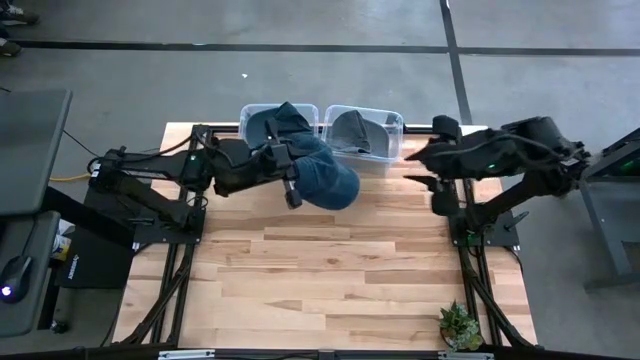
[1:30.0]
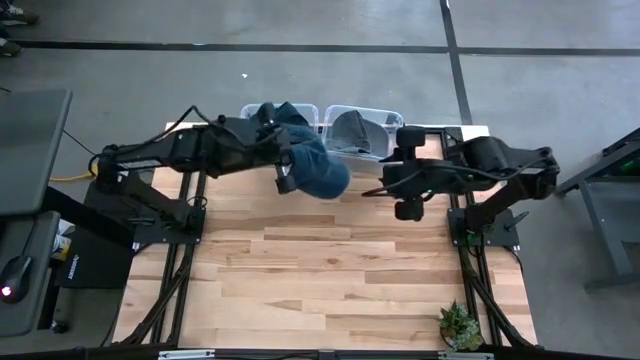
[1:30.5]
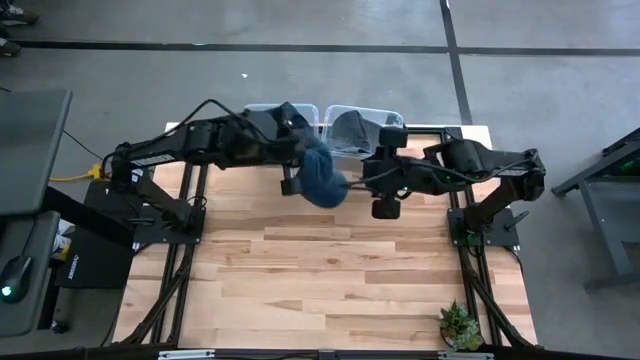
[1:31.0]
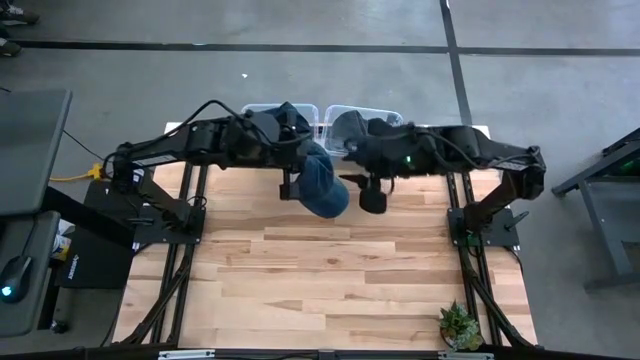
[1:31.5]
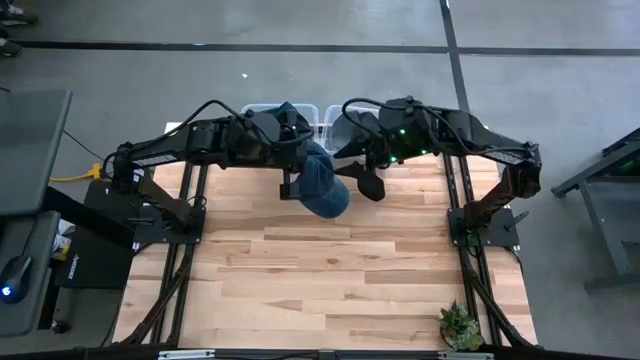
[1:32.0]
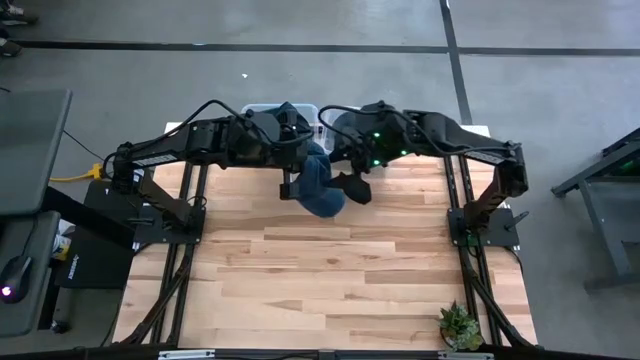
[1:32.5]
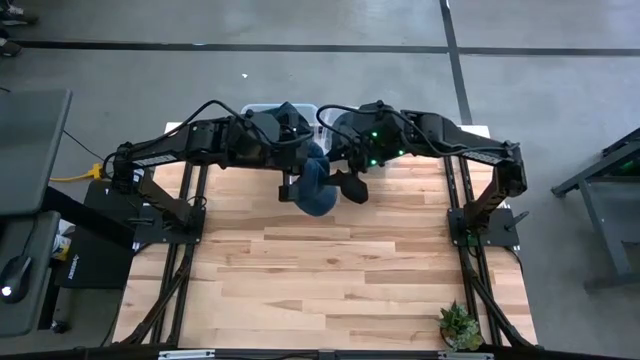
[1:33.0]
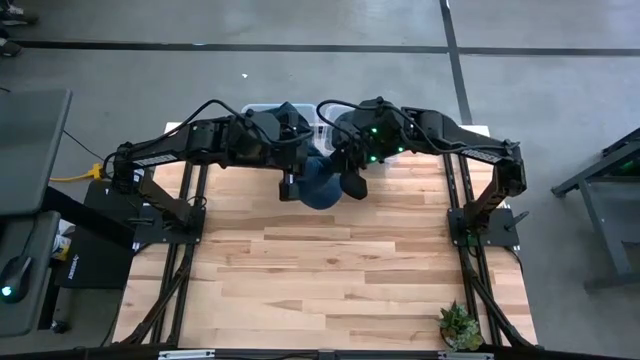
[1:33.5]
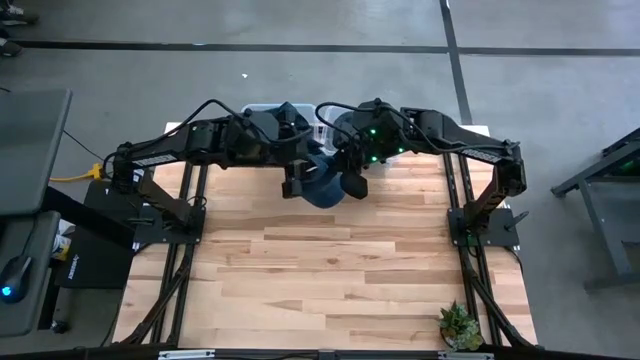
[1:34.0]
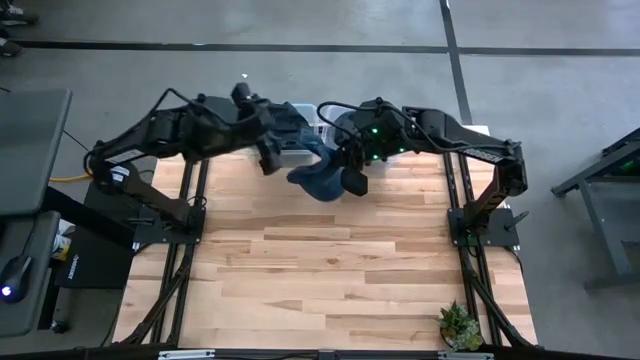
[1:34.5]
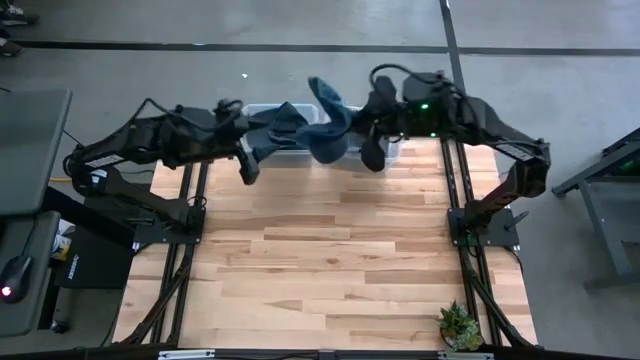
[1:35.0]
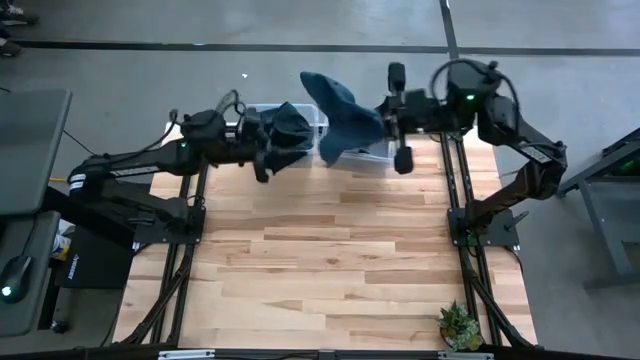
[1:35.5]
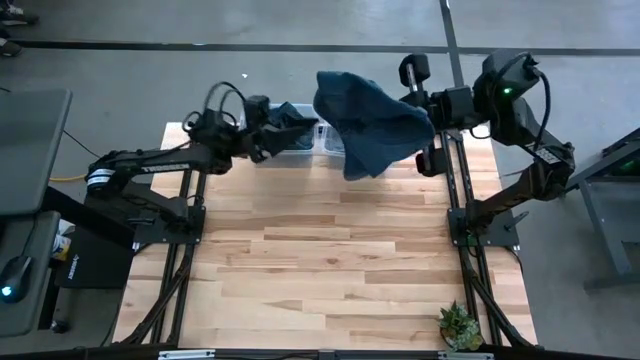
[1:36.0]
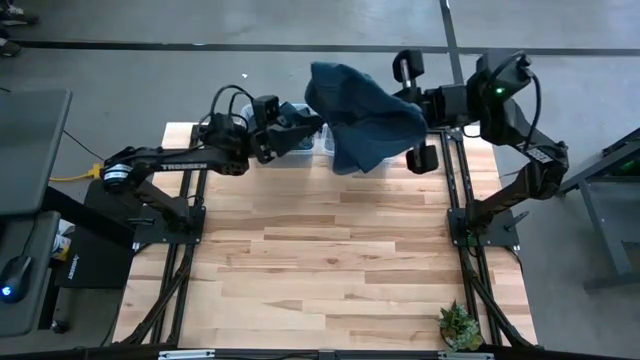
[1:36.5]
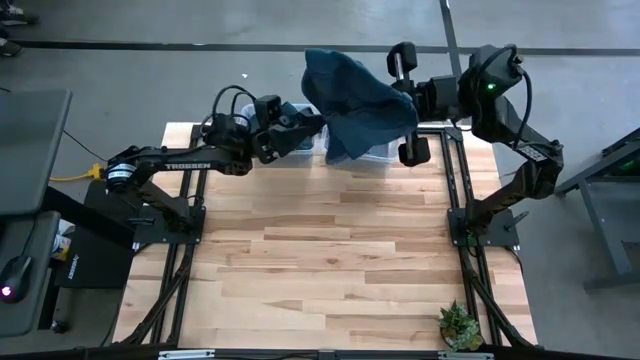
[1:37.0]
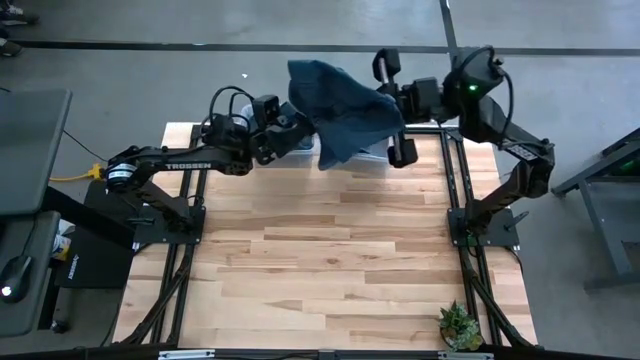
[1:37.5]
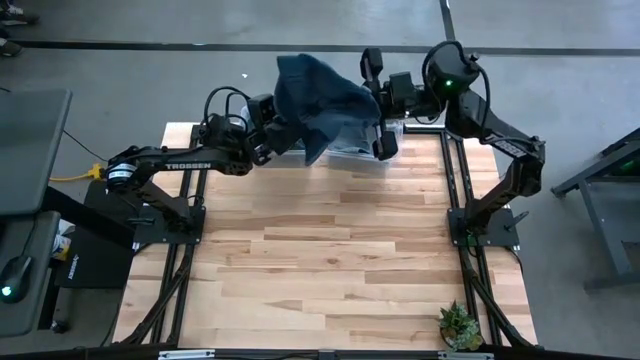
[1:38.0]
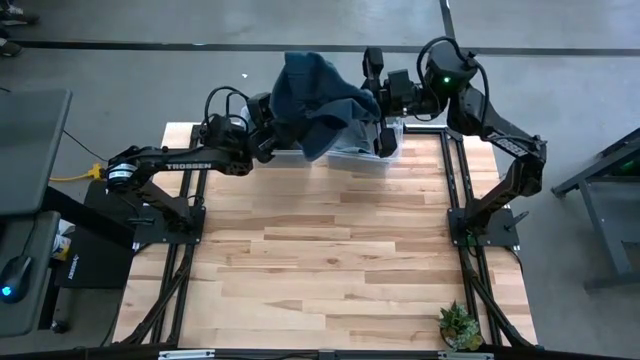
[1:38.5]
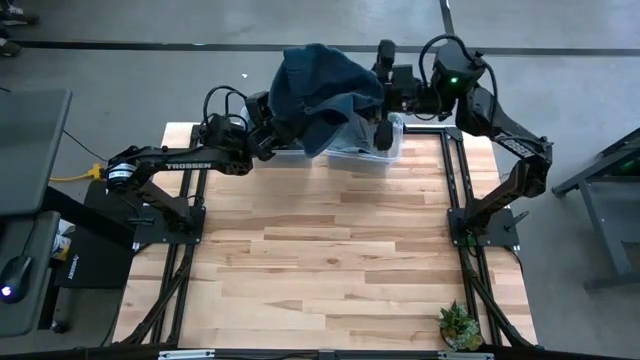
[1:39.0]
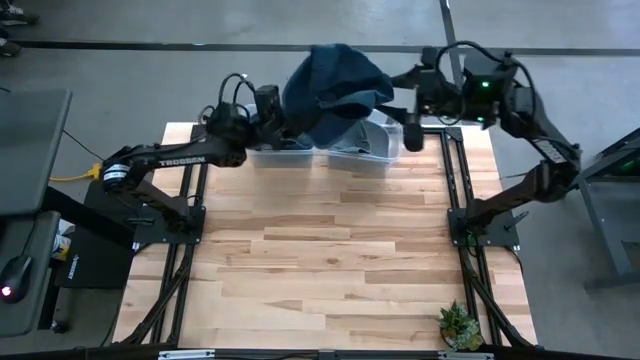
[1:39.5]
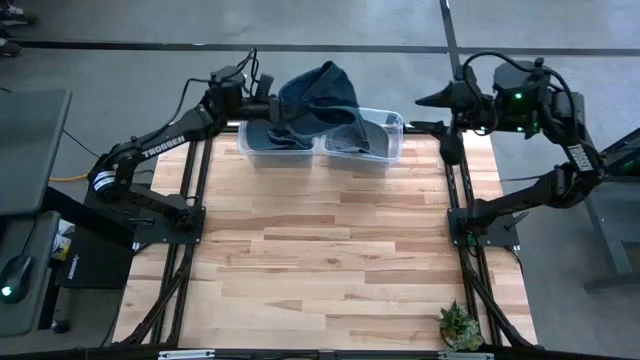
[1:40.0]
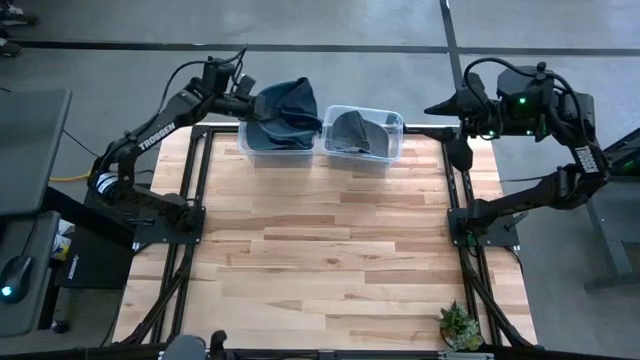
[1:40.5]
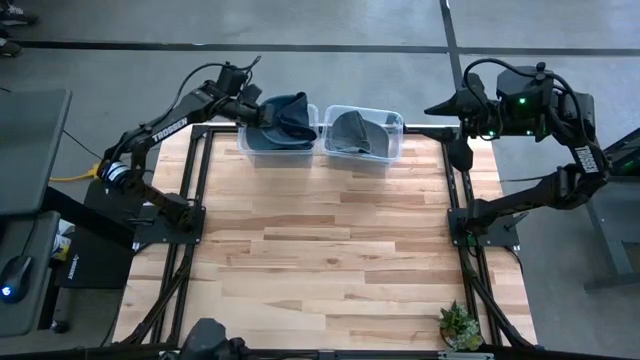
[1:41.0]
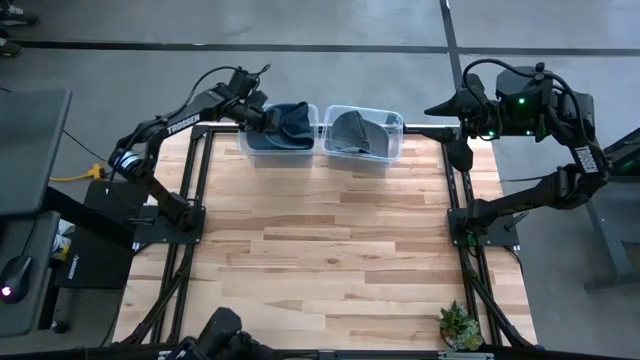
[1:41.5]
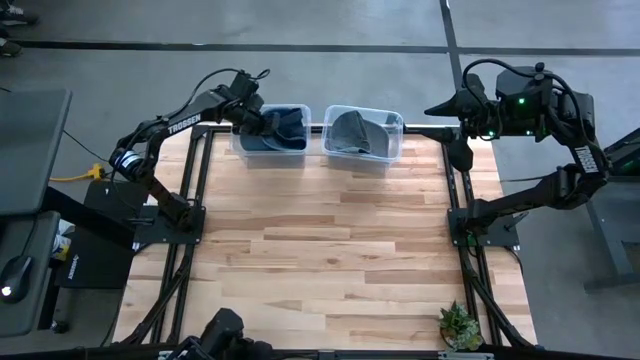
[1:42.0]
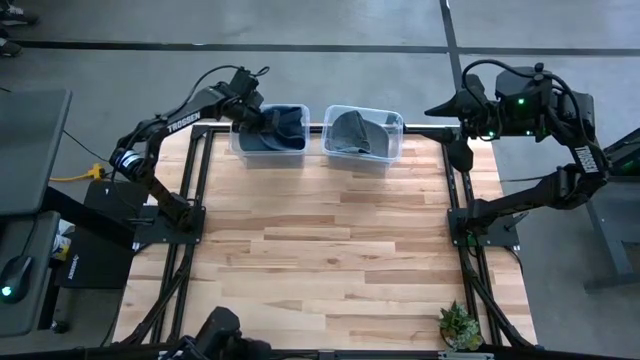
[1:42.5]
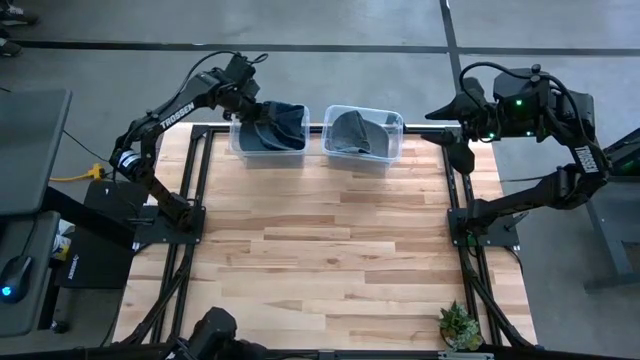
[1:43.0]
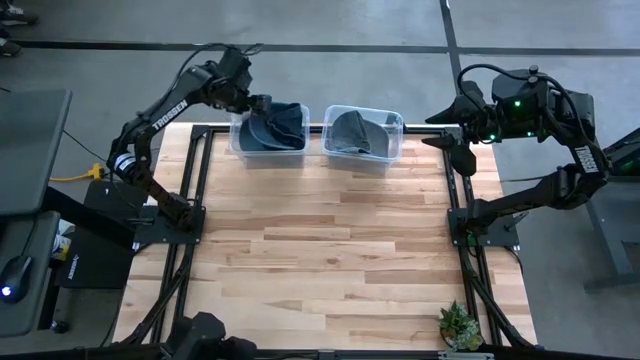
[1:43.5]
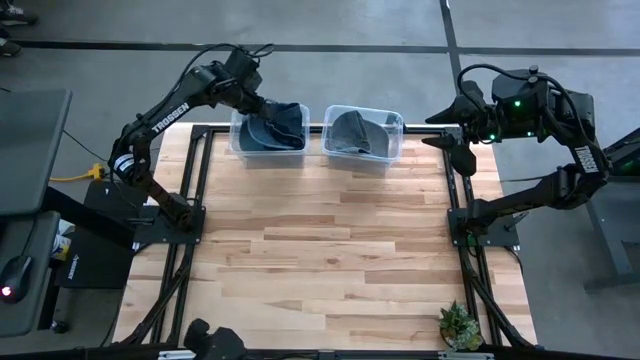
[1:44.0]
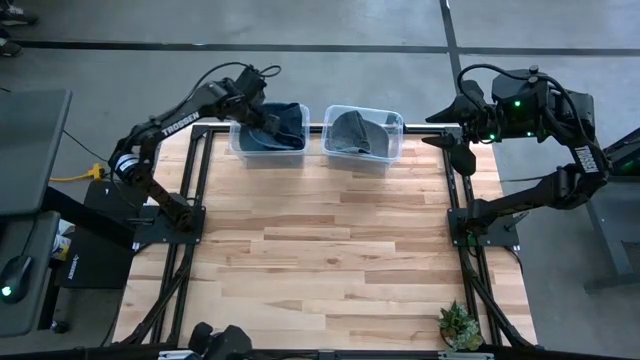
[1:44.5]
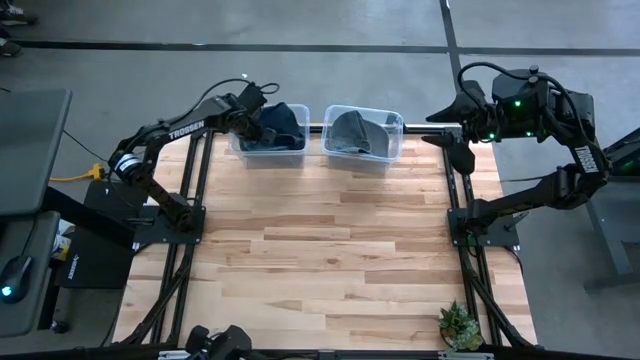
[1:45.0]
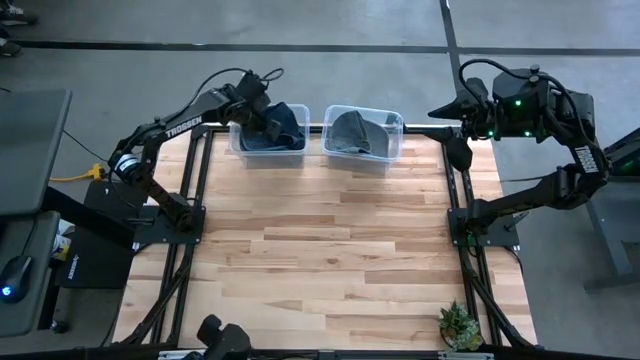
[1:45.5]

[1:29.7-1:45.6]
Task: Pick and place caps into container
Put the blue cap into the left transparent container

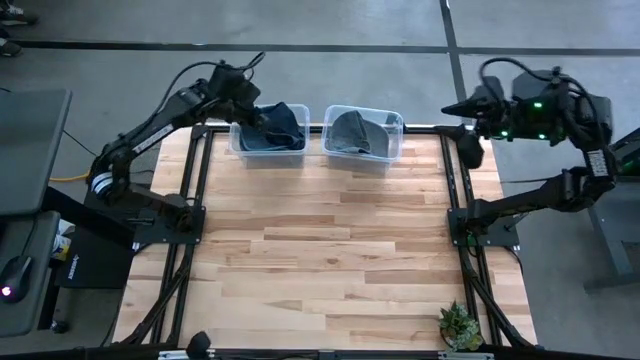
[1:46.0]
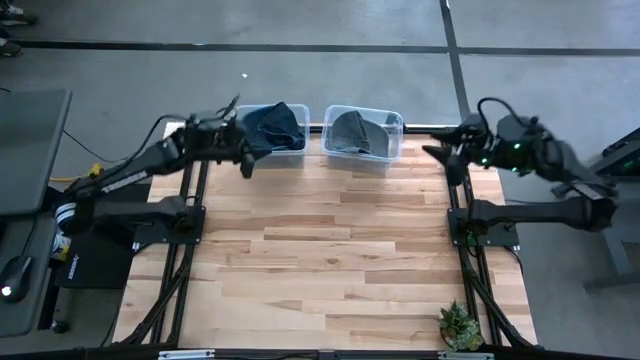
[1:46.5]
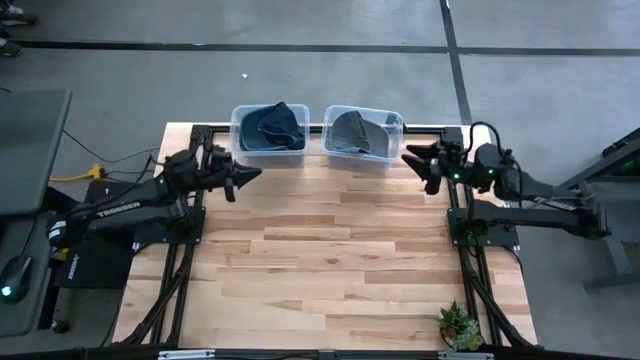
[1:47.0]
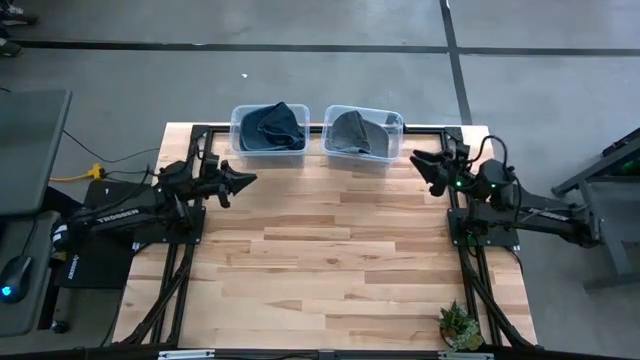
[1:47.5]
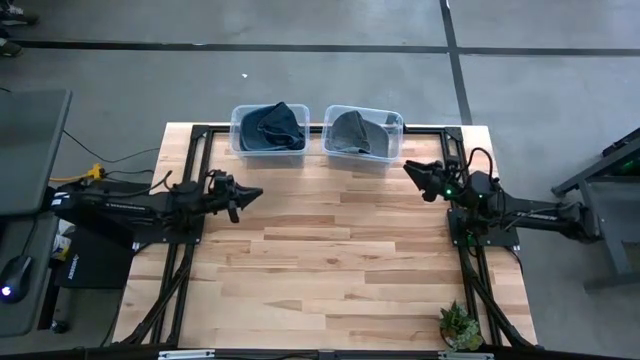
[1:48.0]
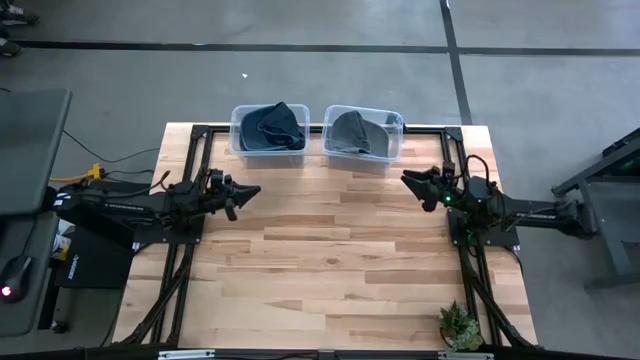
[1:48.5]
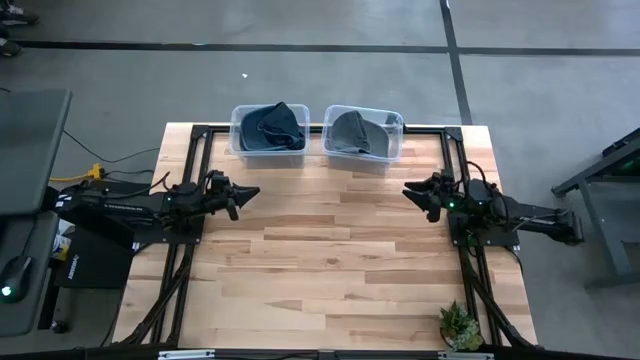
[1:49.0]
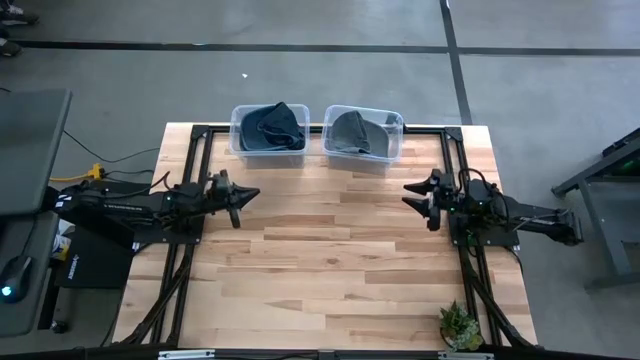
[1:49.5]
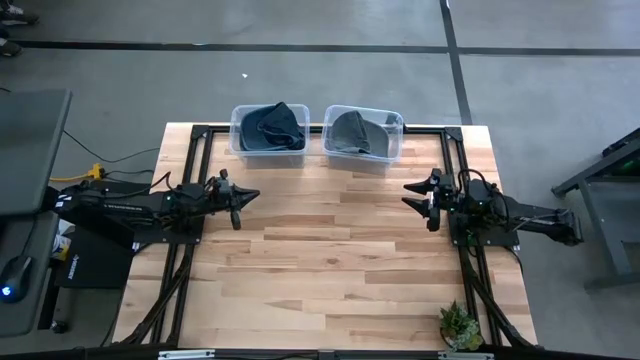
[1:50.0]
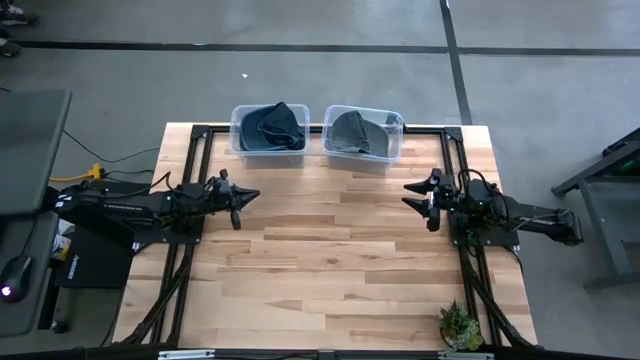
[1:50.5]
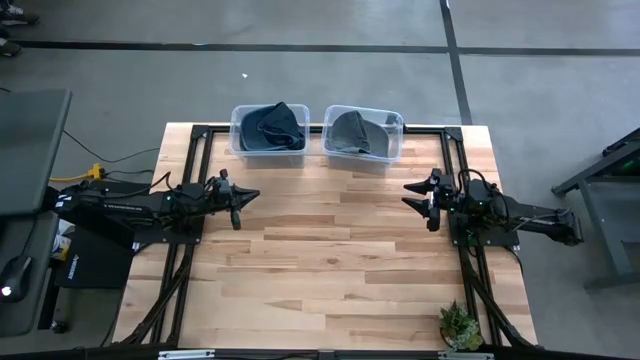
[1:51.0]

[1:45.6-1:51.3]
Return to Home Position
